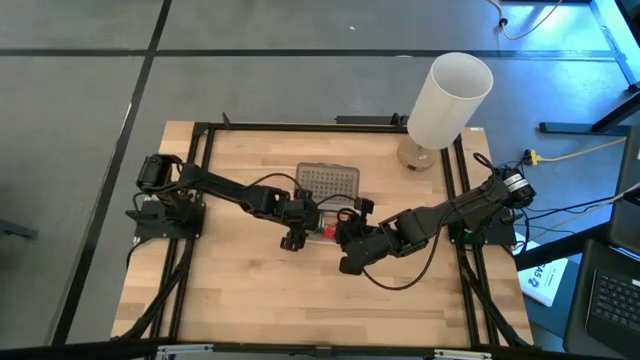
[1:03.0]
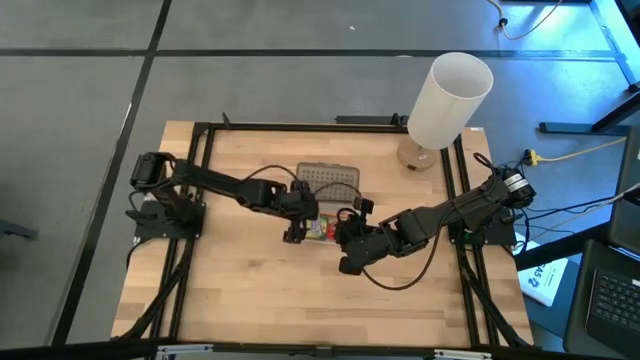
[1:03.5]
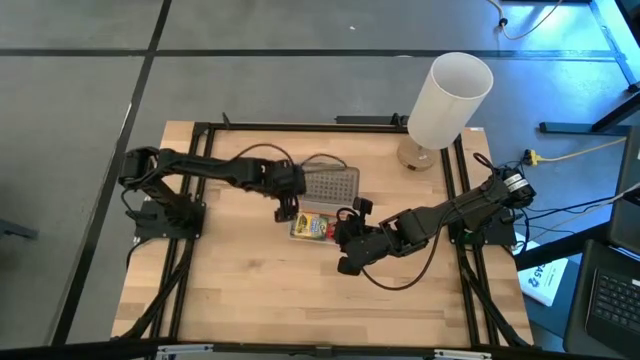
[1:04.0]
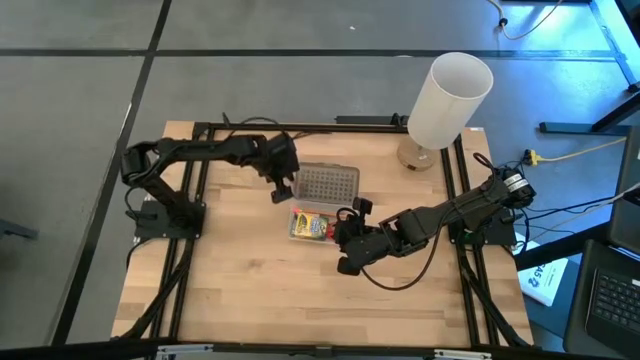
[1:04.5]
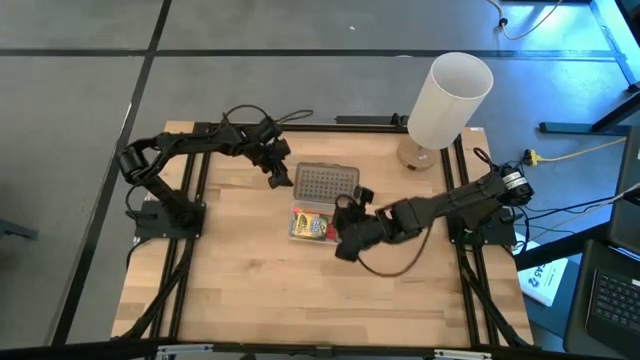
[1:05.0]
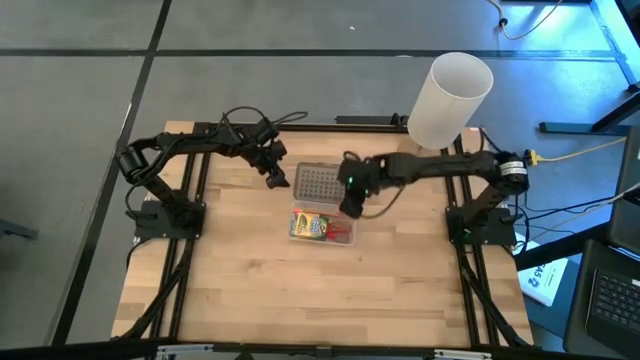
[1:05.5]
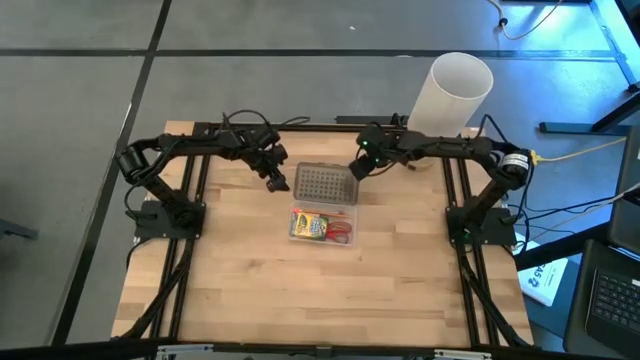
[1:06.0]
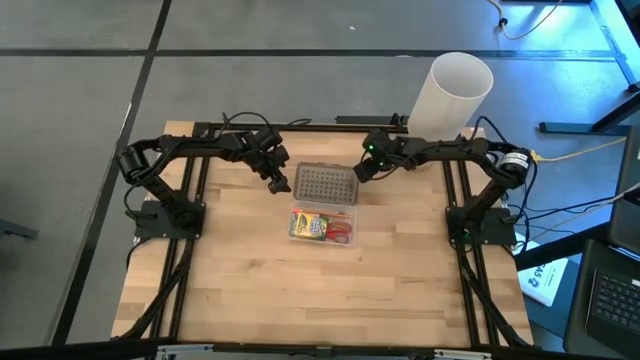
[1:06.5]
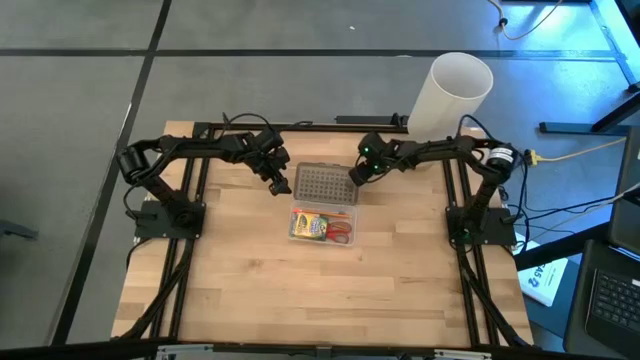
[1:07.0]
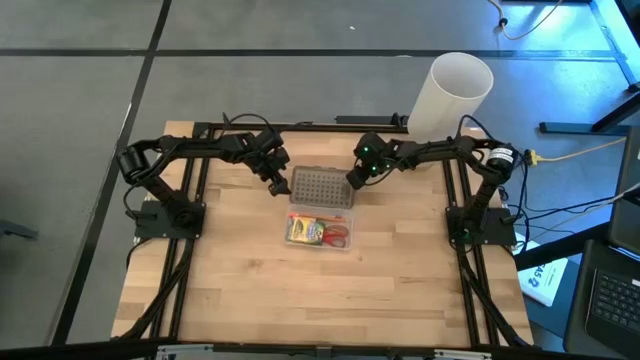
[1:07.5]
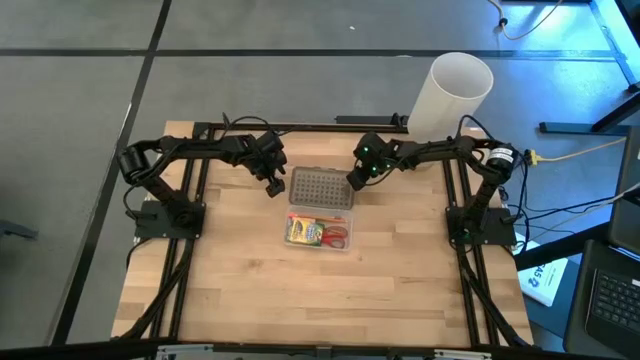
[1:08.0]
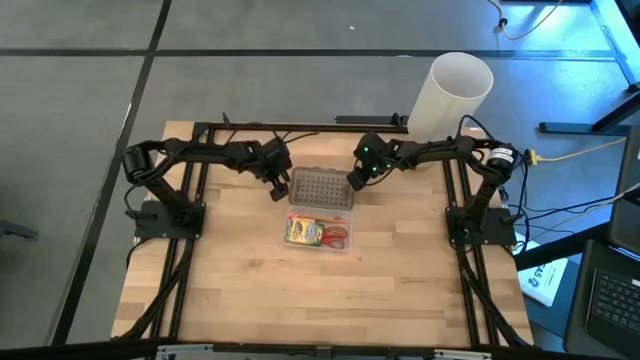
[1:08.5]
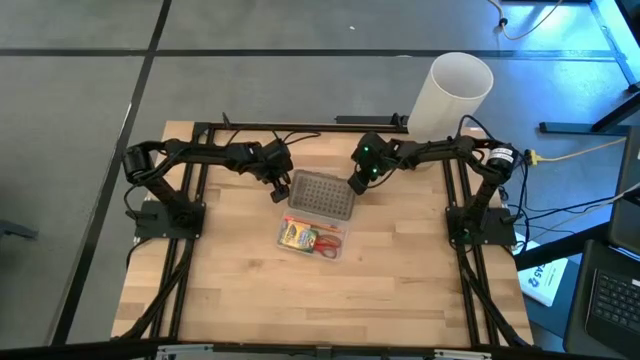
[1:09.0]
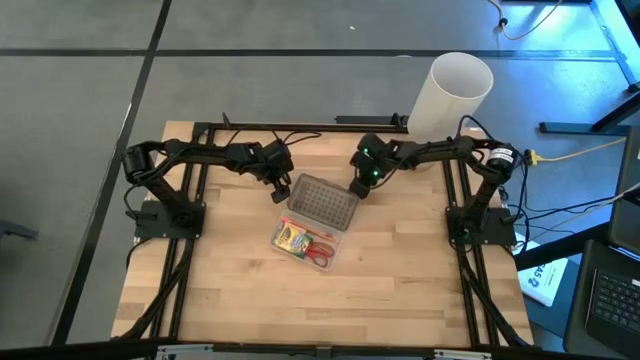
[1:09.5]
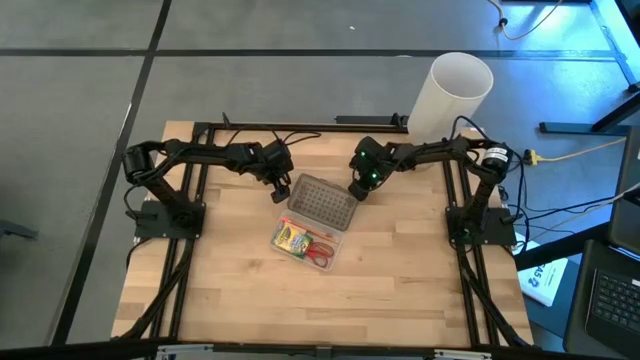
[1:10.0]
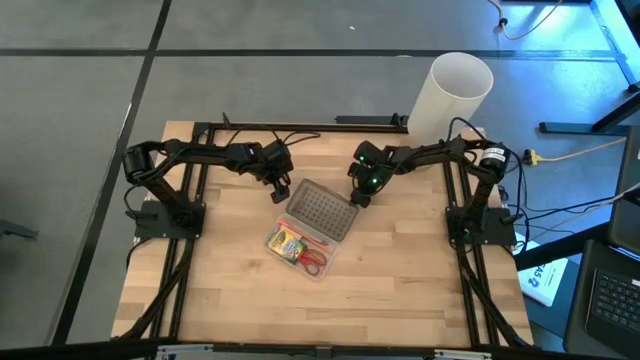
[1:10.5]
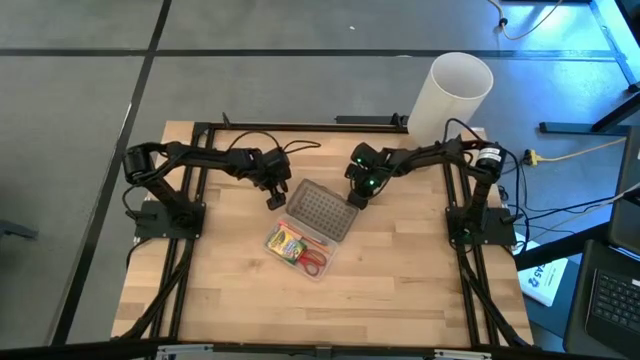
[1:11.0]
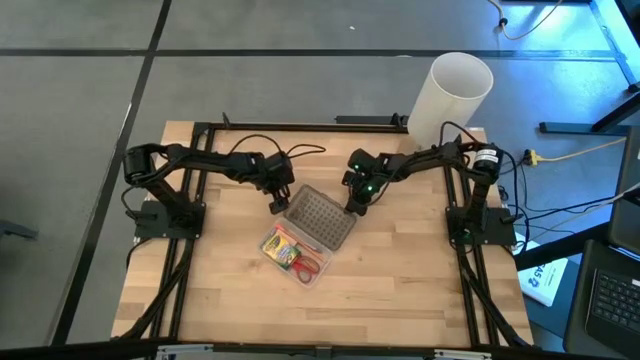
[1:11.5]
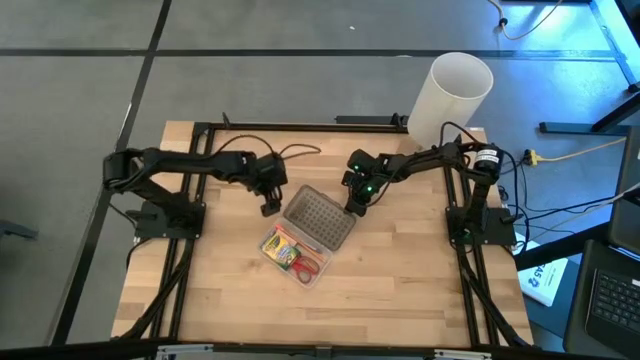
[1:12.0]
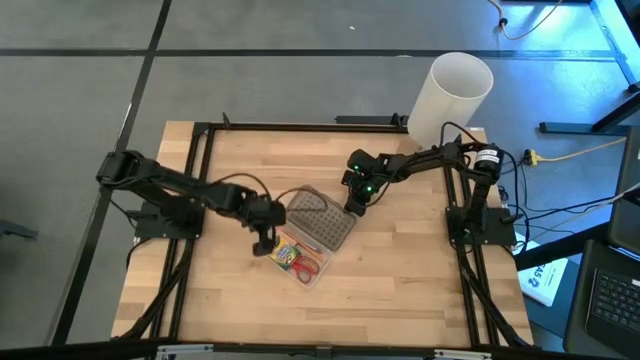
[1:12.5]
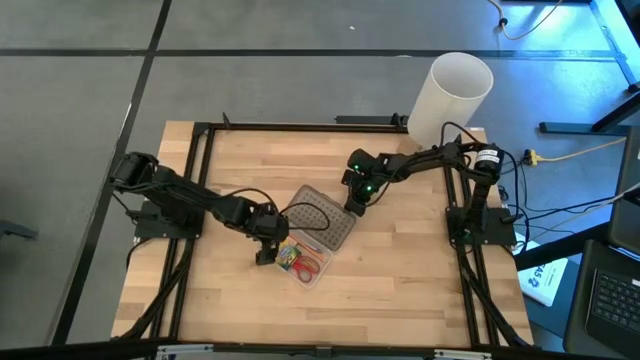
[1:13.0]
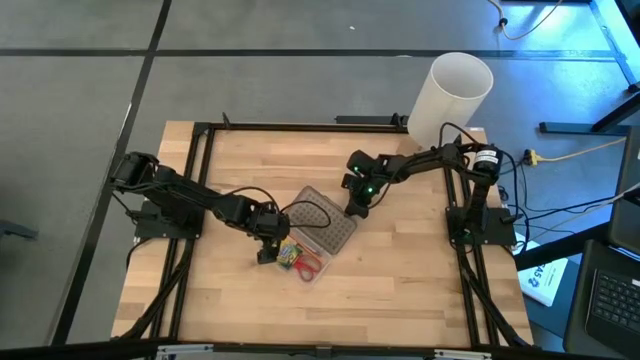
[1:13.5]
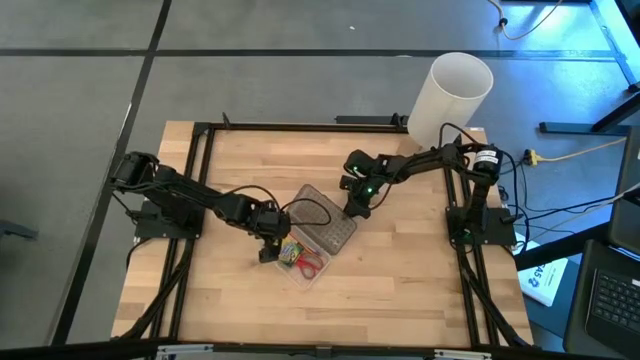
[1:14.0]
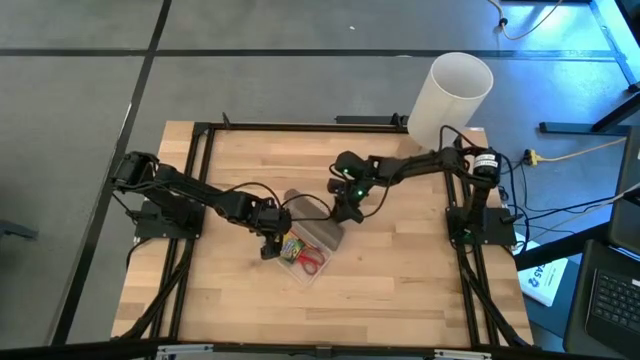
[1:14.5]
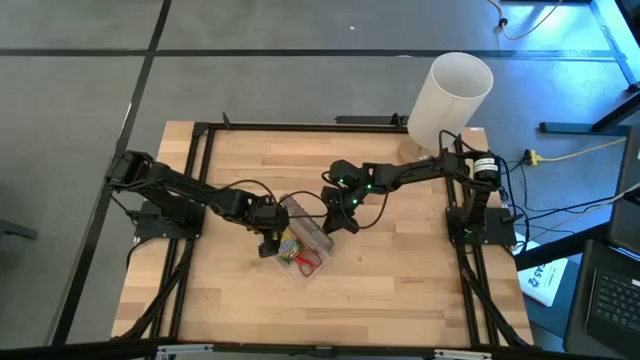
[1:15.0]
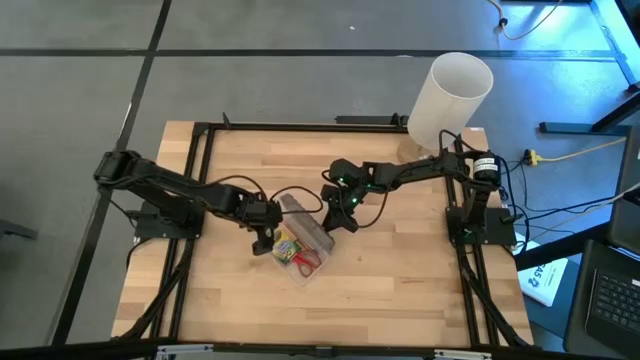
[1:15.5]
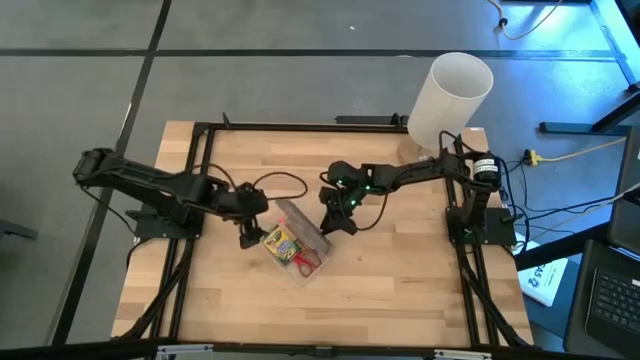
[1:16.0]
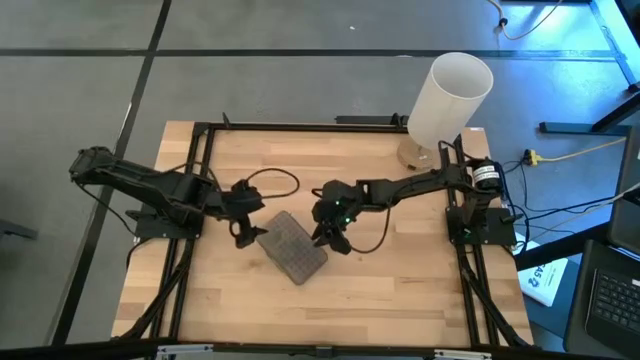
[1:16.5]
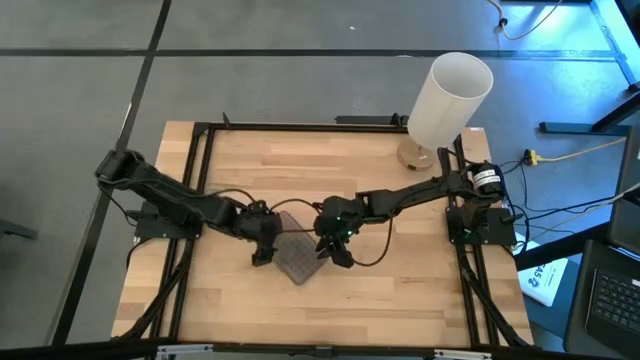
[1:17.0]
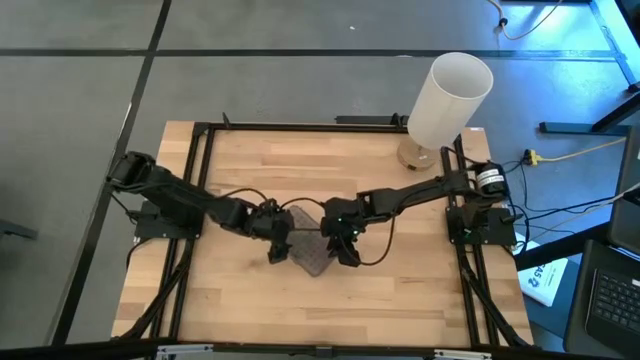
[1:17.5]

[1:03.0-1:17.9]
Task: Pack school essentials
Close the supply box

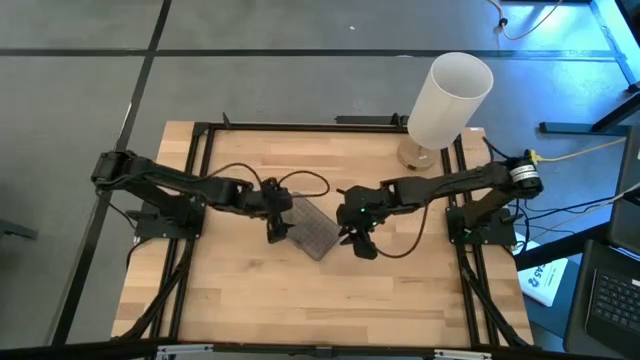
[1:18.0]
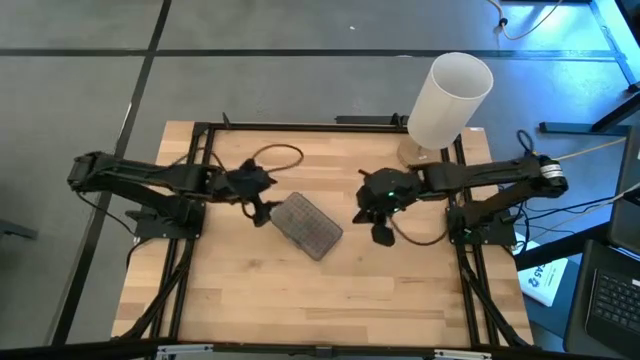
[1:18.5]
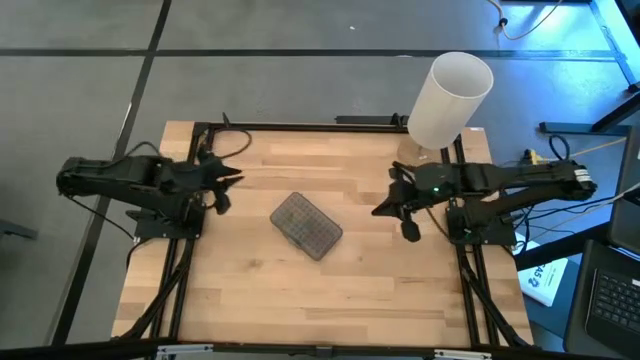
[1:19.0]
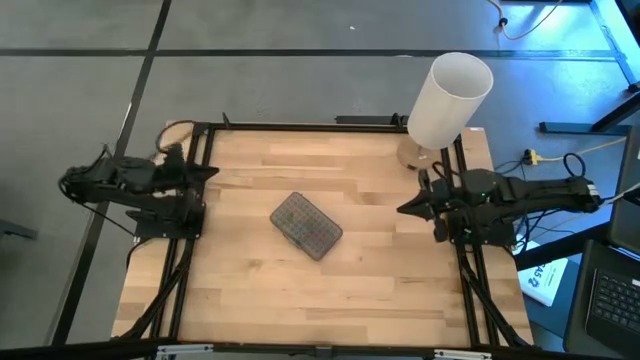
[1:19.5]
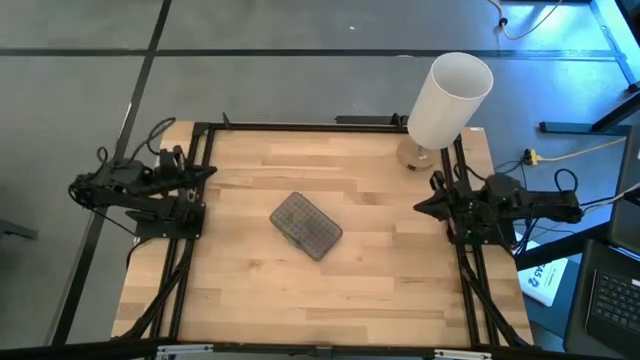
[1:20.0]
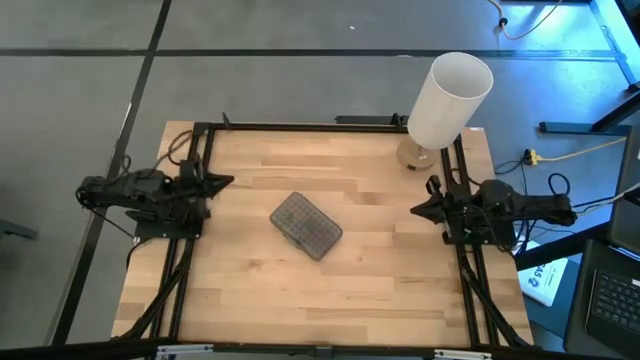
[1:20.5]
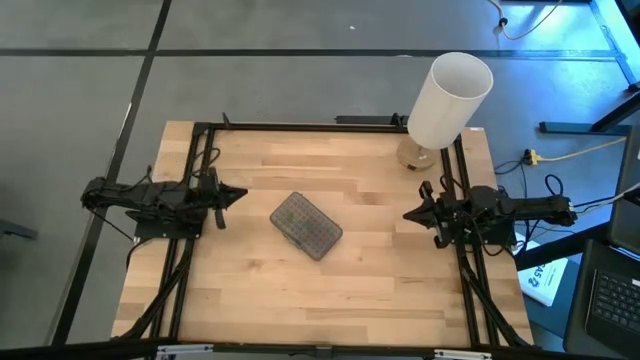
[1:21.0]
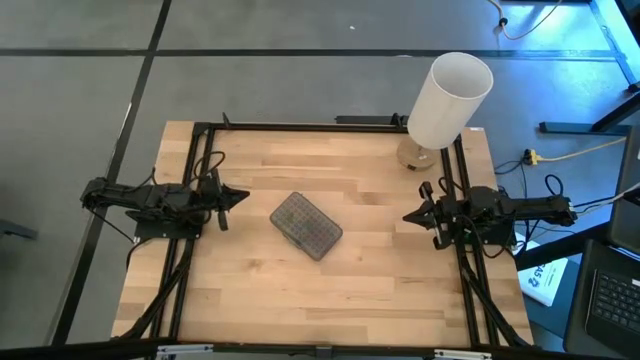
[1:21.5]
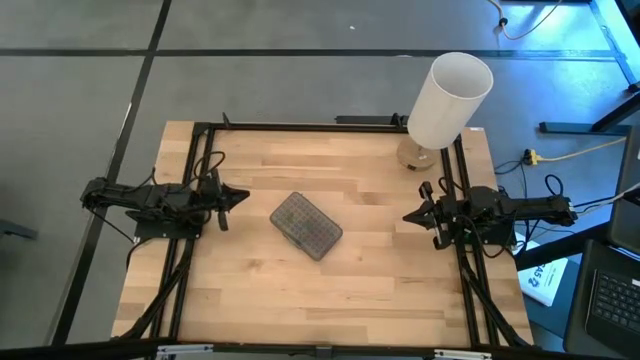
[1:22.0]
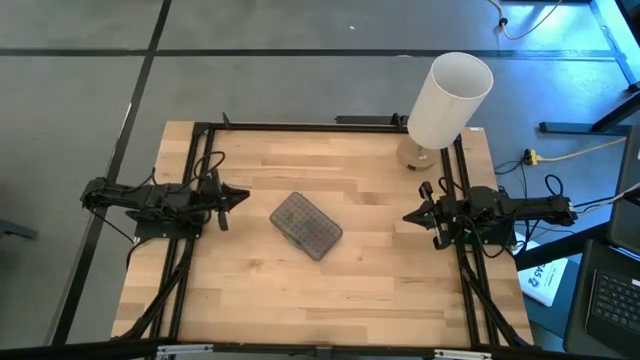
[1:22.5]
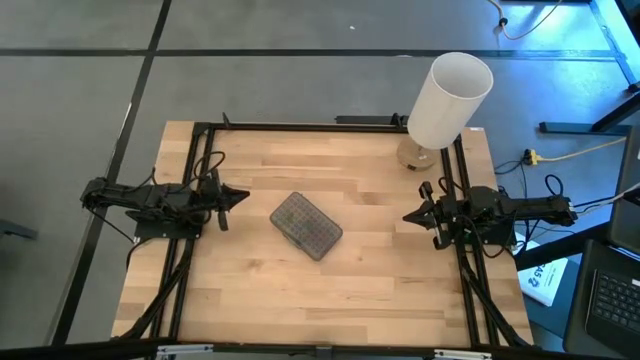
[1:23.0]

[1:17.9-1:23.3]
Return to Home Position
